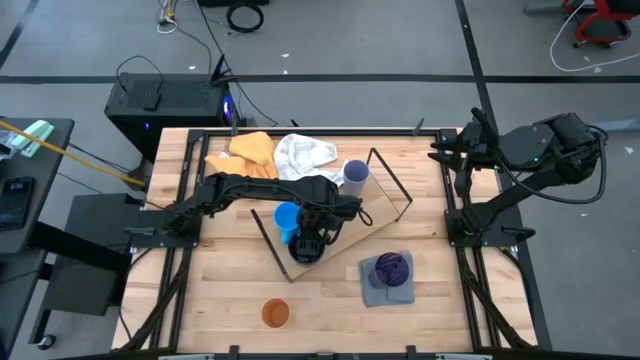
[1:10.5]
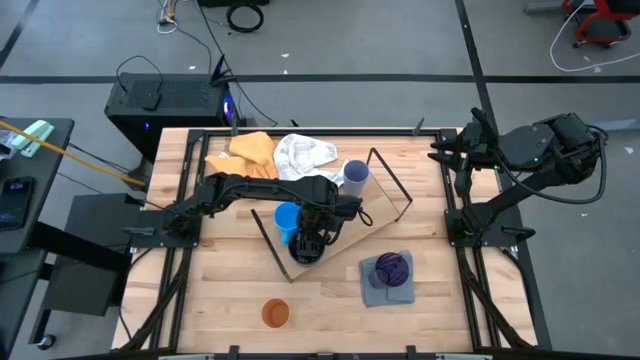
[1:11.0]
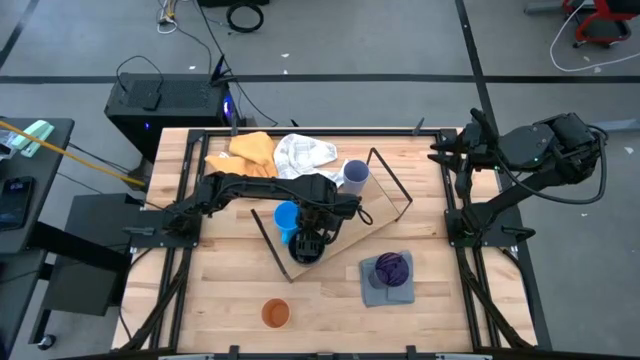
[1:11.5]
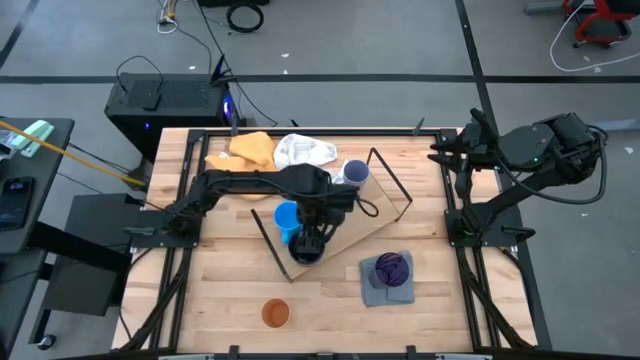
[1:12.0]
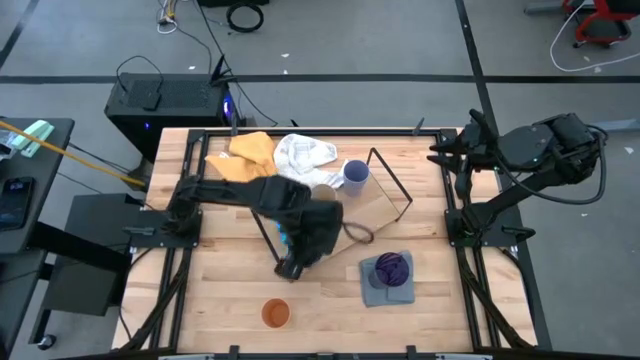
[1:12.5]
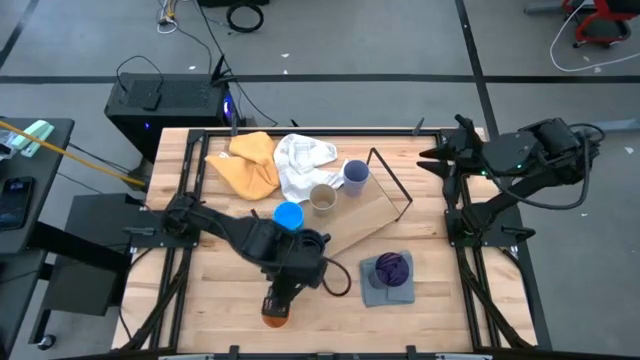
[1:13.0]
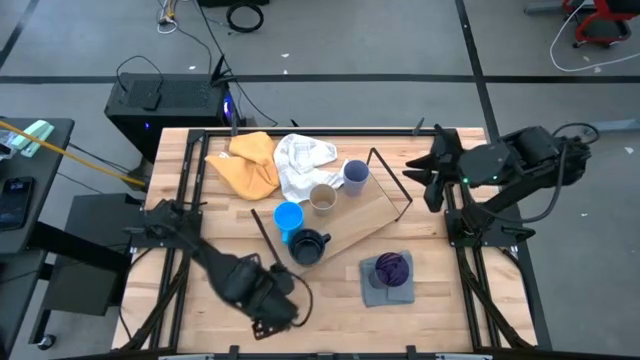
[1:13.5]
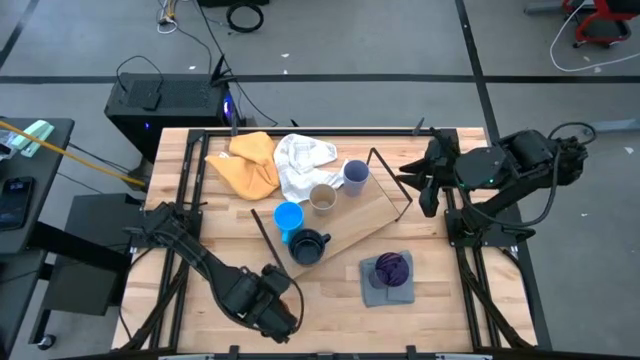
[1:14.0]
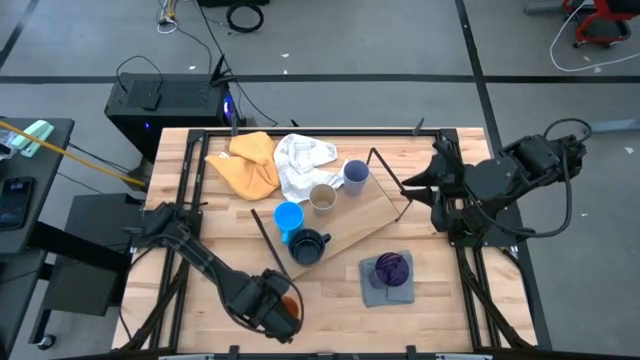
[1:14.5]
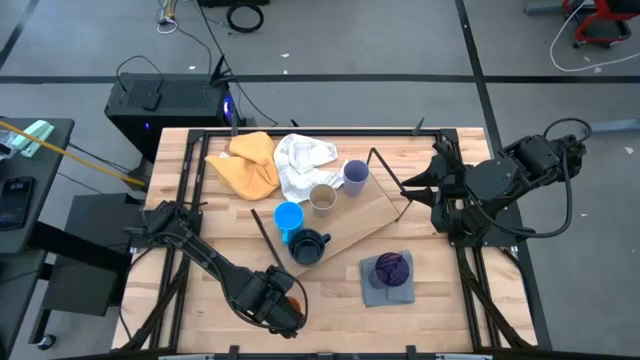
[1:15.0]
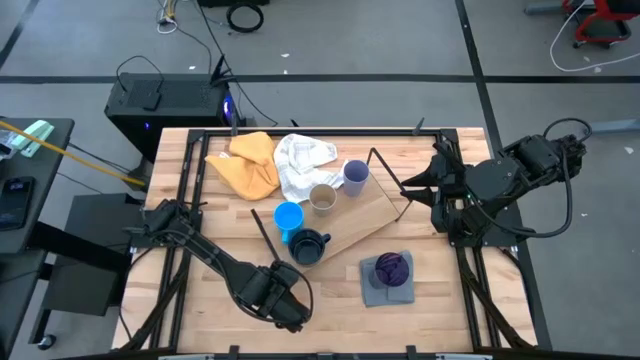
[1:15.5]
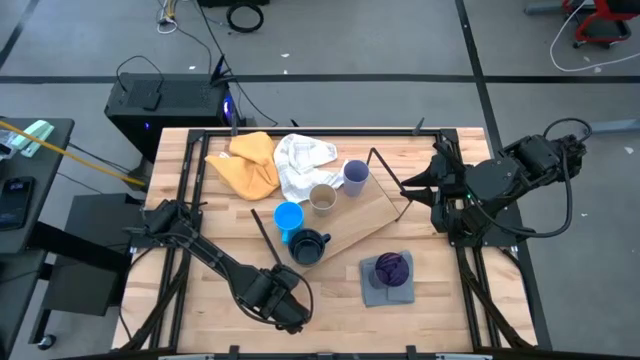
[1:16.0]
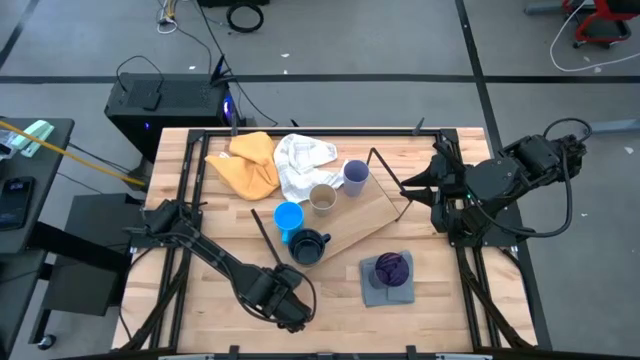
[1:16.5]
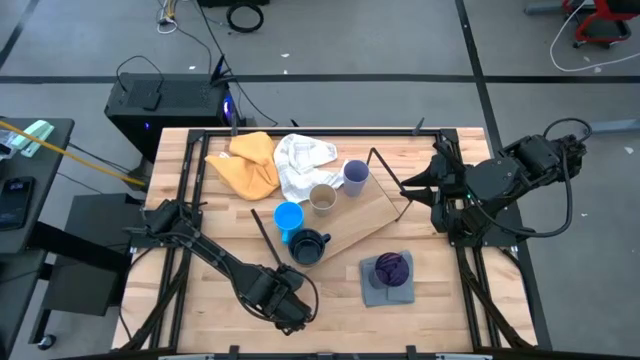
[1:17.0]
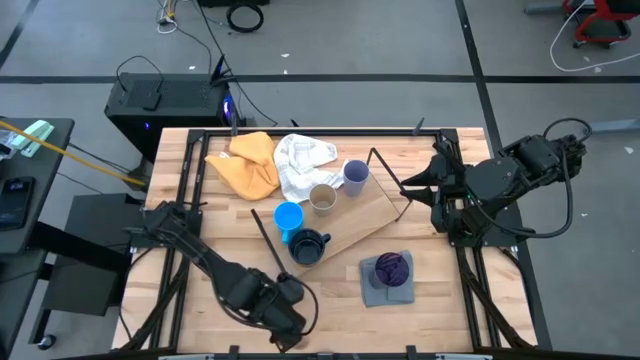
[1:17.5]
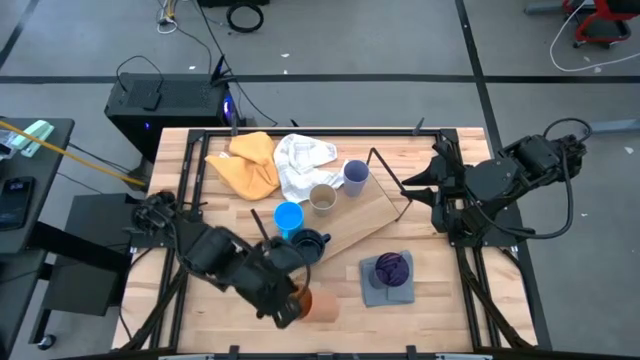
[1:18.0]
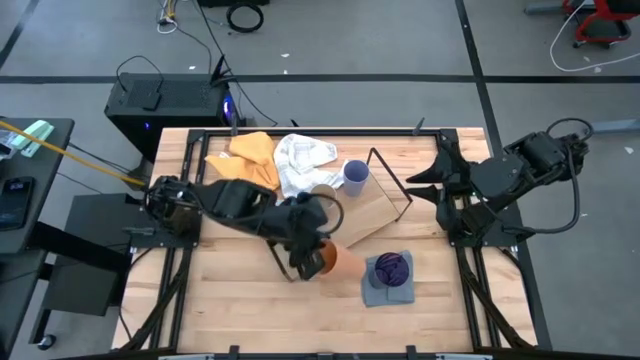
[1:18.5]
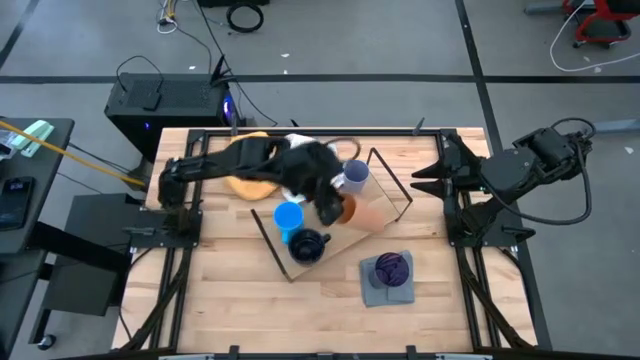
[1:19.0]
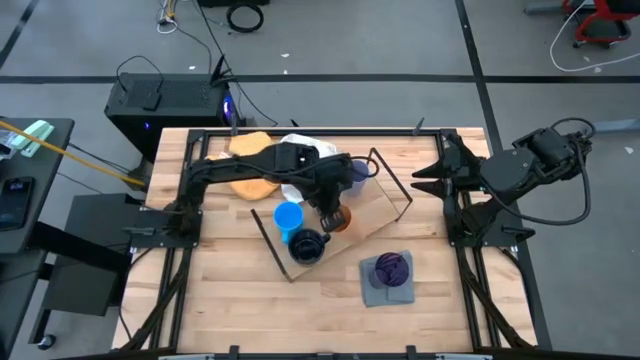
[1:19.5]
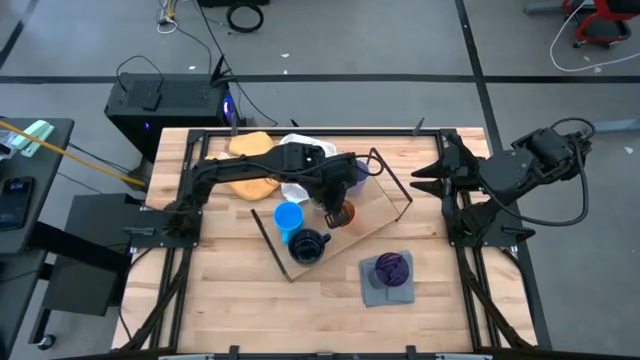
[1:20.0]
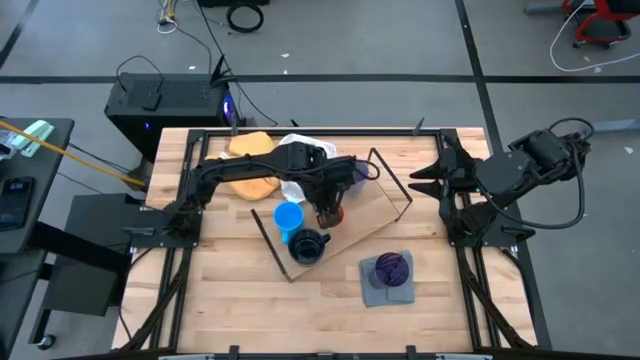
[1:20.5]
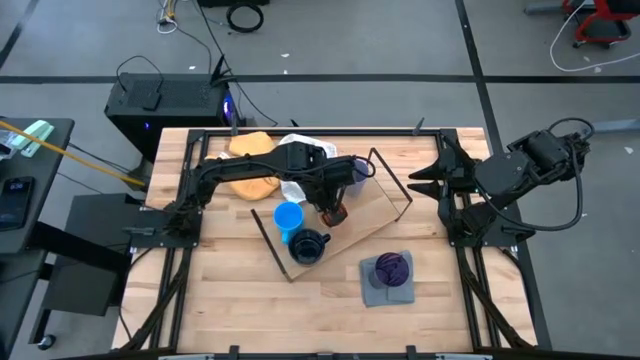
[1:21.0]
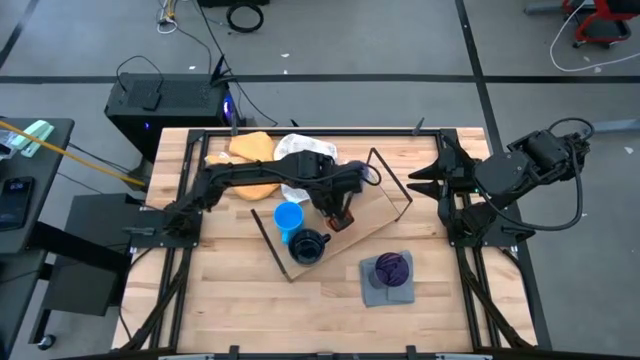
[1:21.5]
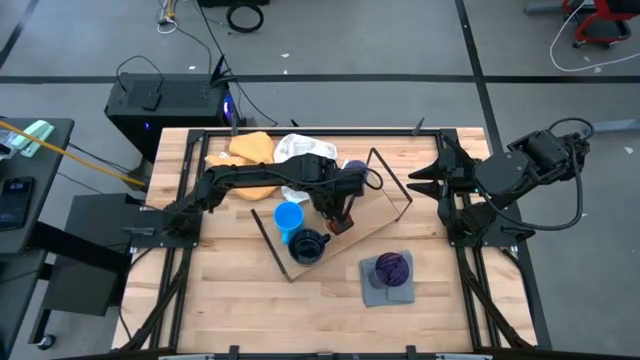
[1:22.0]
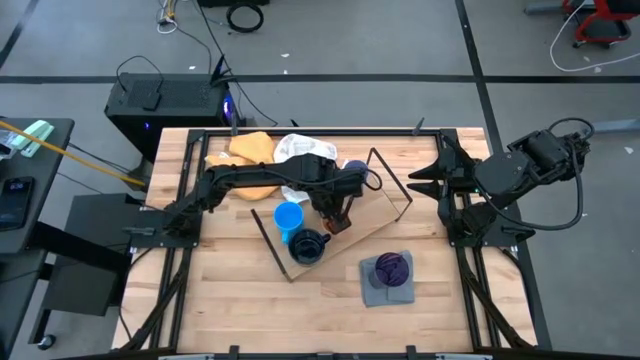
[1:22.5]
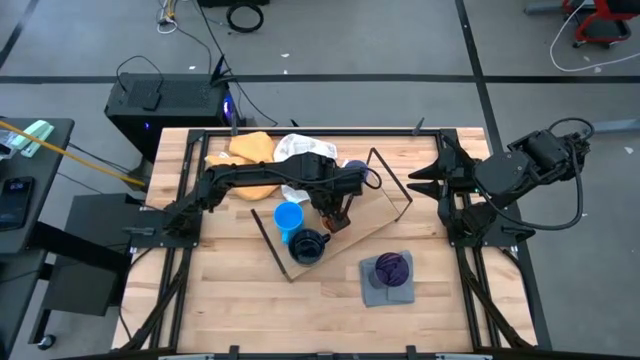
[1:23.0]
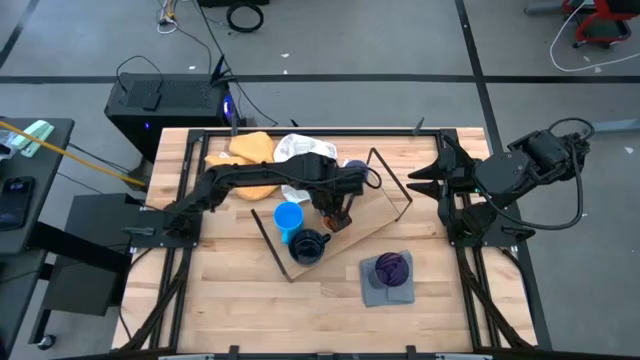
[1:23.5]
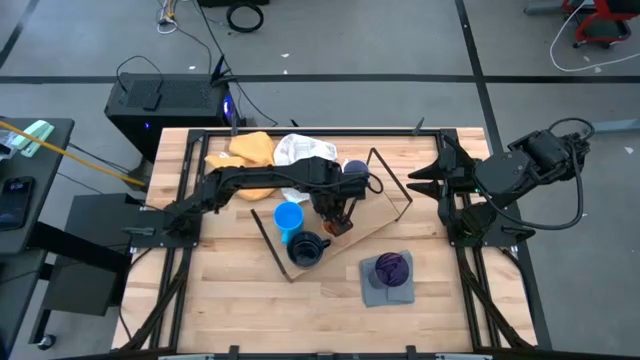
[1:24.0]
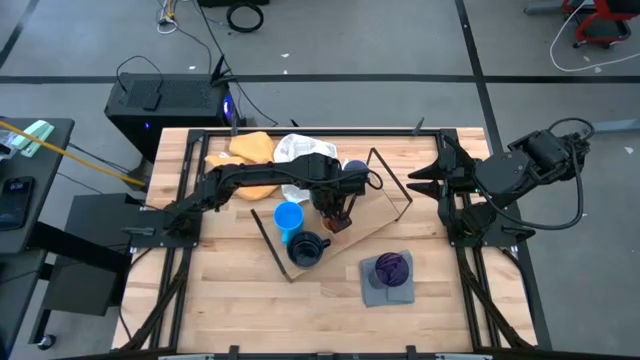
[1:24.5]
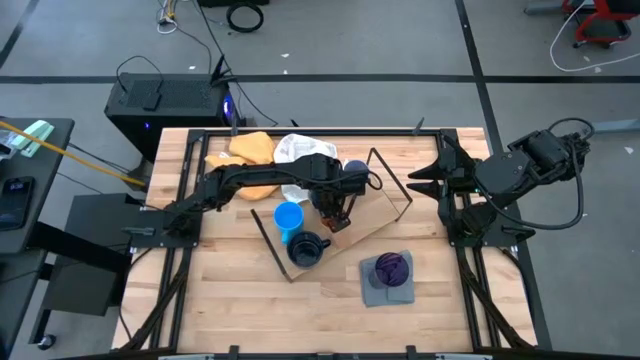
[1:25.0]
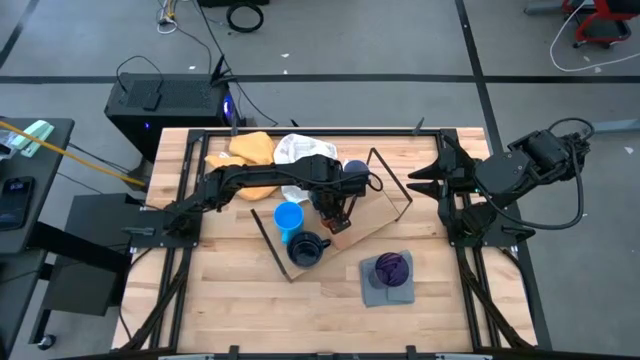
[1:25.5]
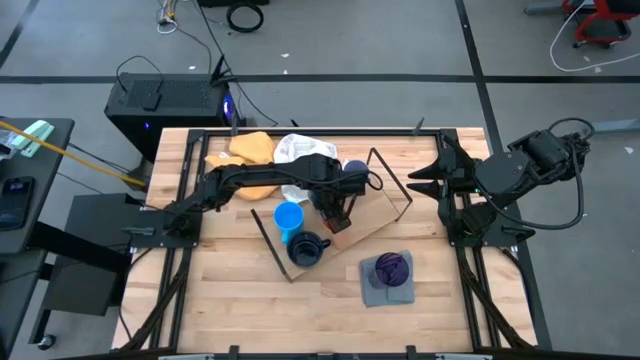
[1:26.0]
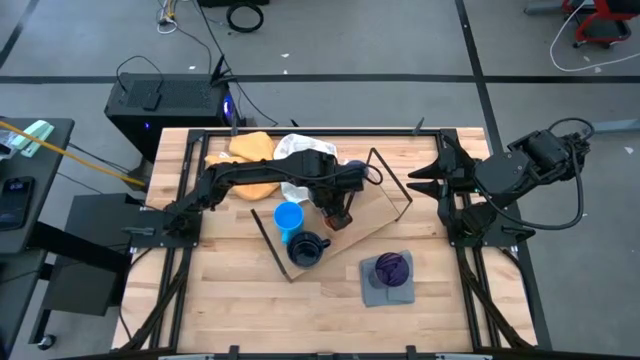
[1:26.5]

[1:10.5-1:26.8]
Task: Stack small to large cups/mugs on shelf
Align the orange cup with the white cup on the shelf

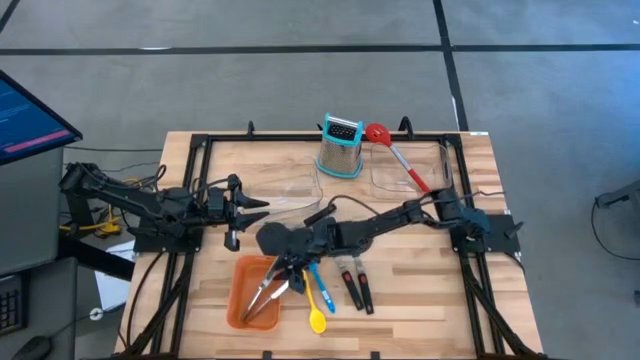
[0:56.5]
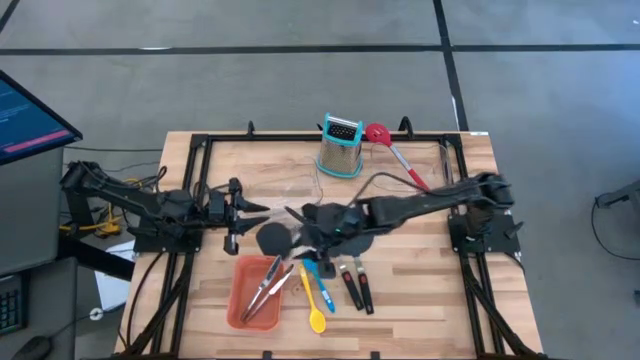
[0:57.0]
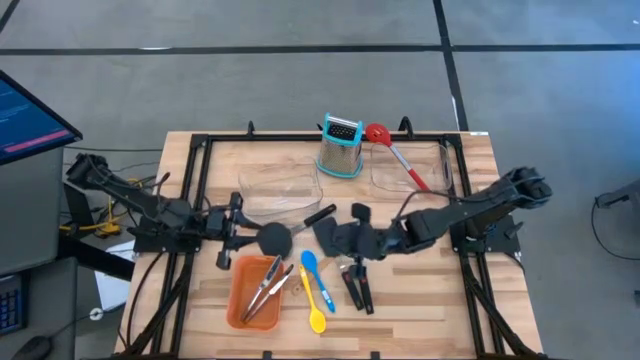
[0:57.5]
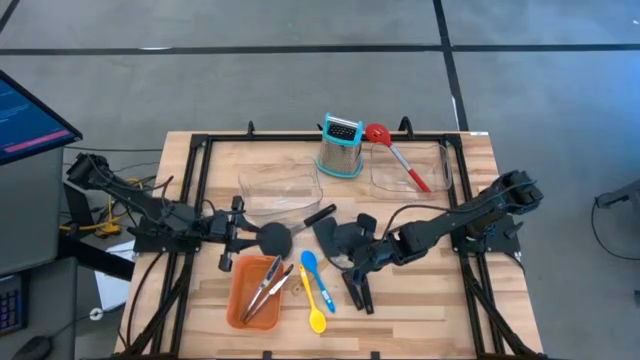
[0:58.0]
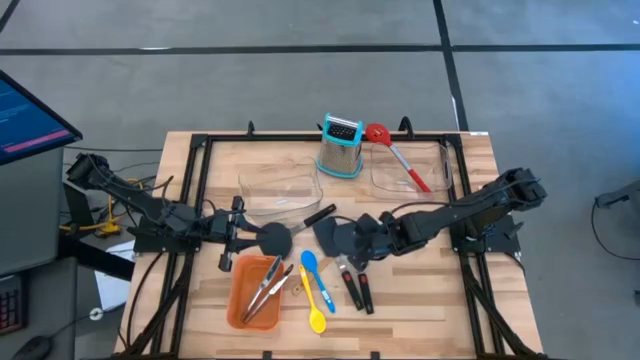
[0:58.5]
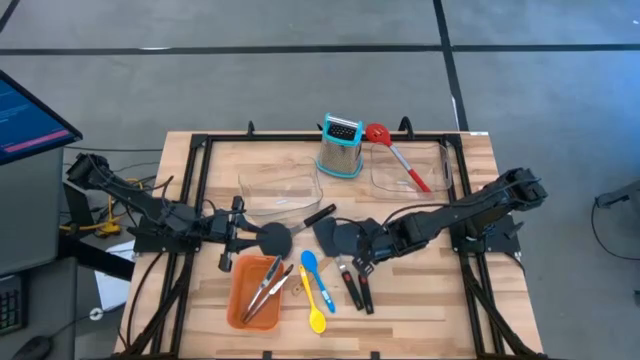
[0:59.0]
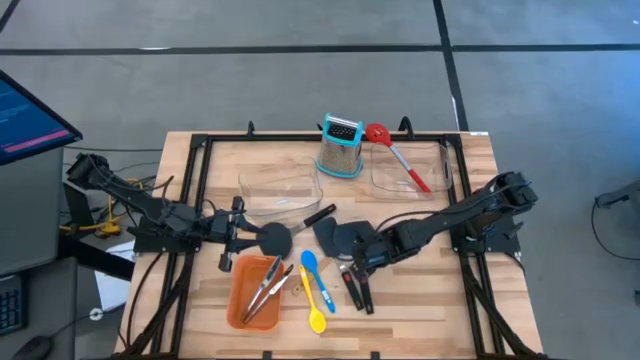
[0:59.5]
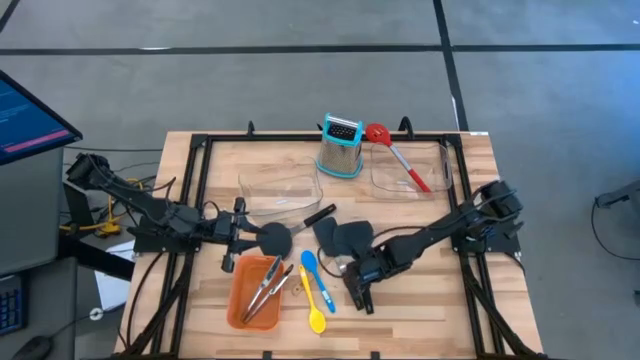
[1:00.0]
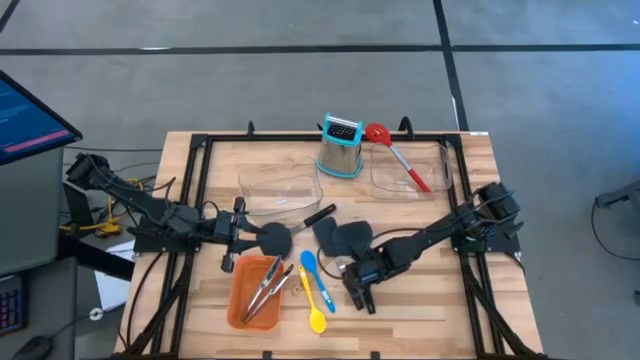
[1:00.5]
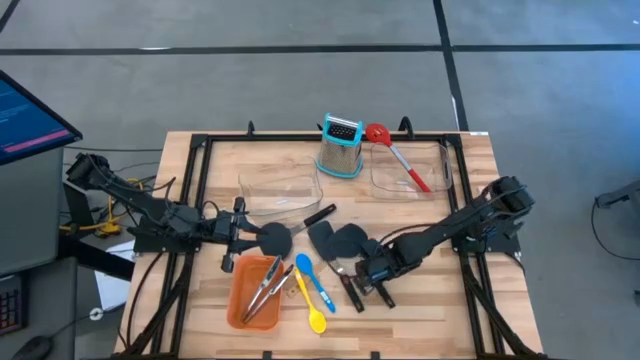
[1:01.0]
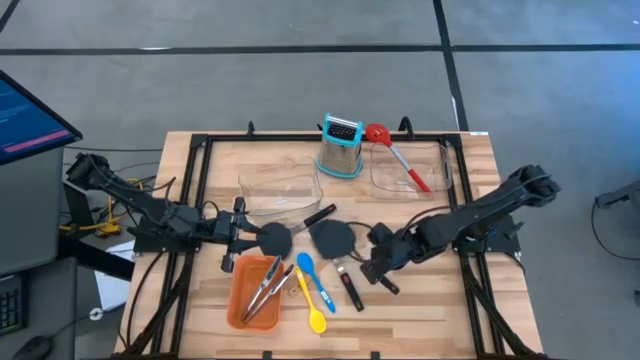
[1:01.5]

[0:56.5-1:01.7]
Task: Pick & Place Kitchen Items
Put the right black spatula into the left transparent bin
